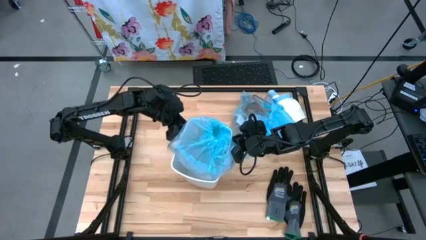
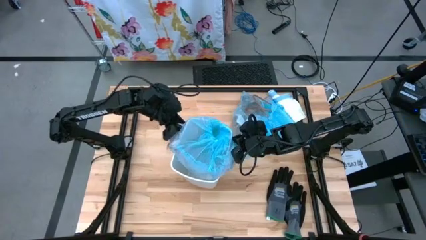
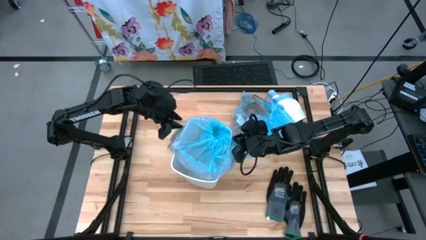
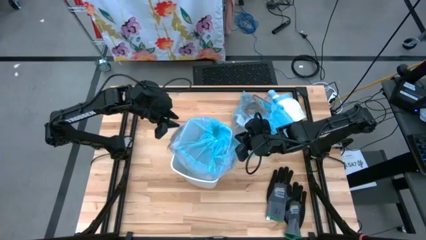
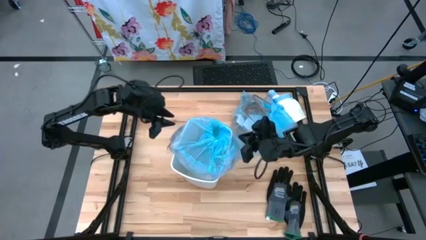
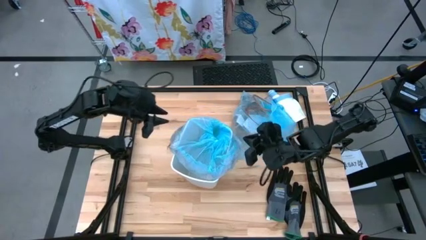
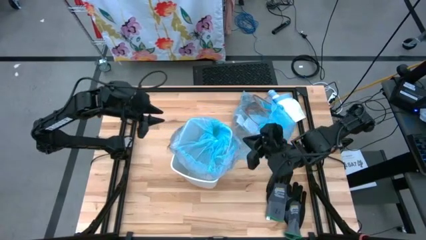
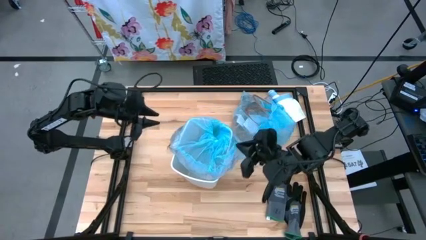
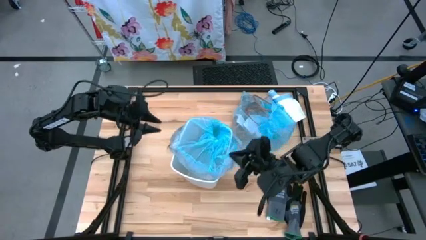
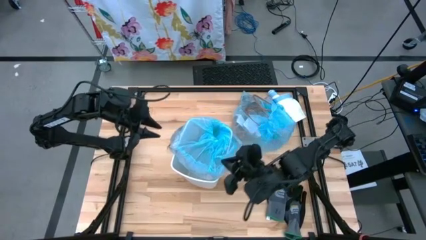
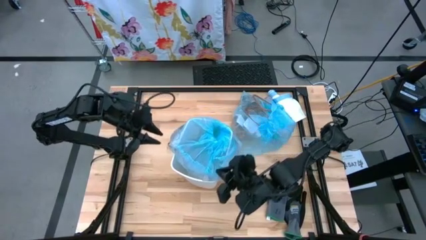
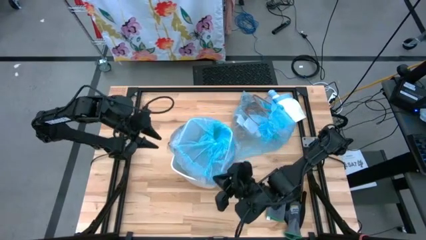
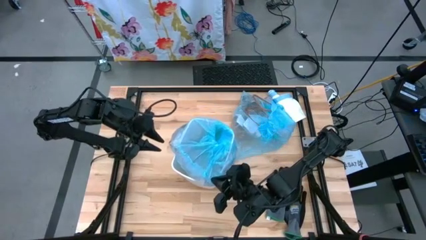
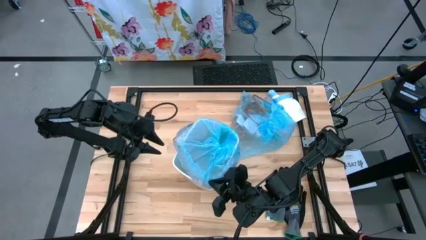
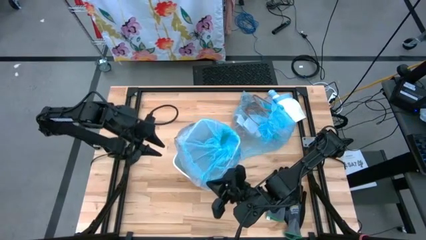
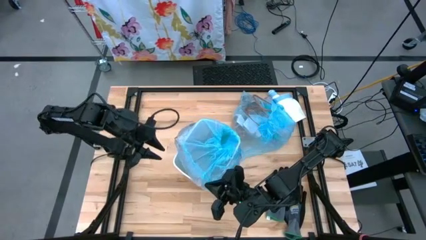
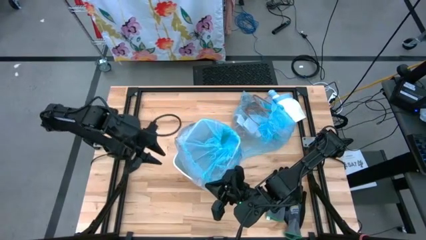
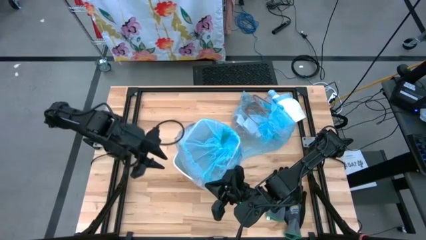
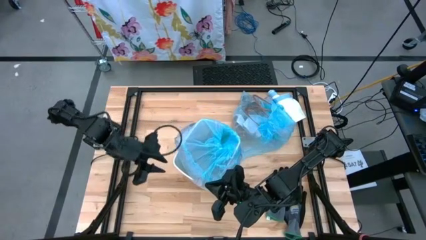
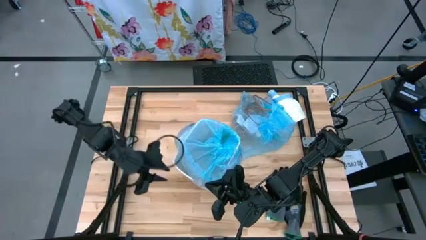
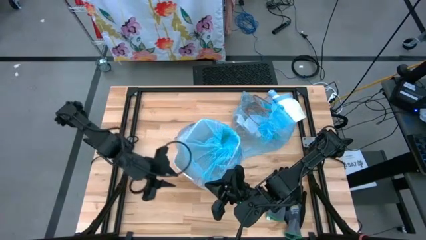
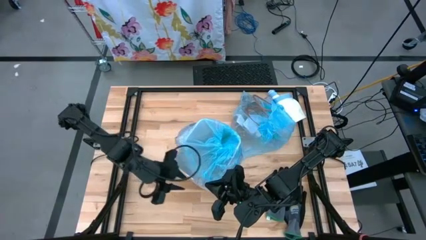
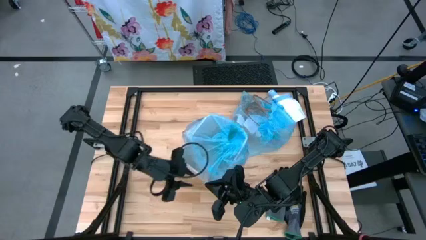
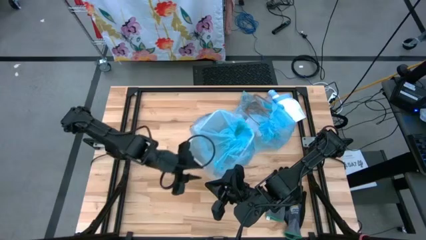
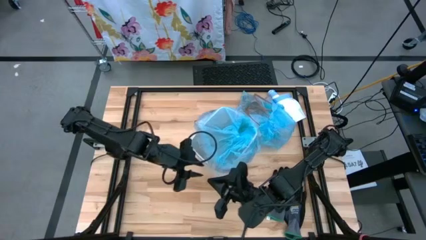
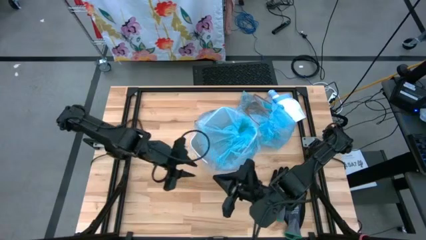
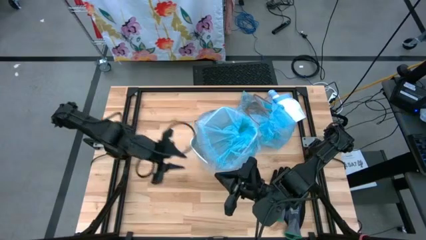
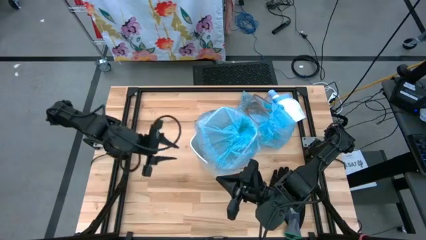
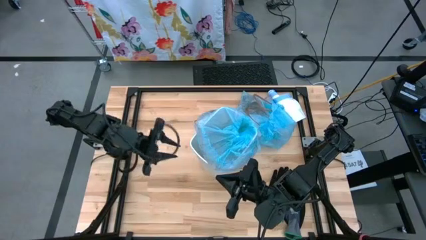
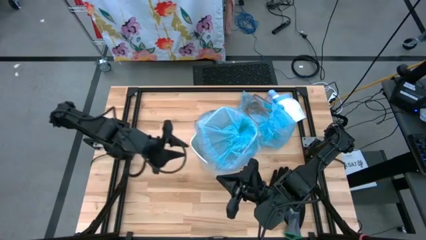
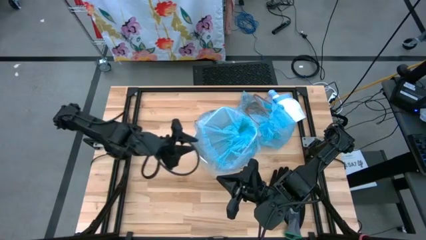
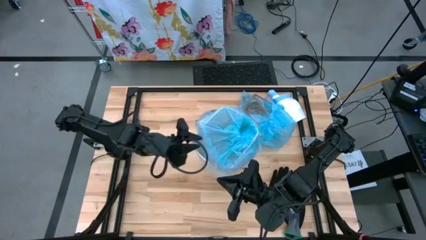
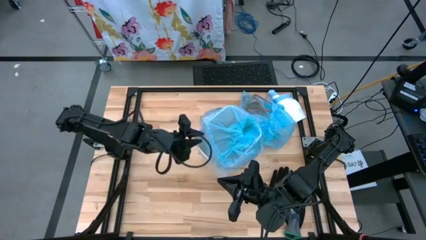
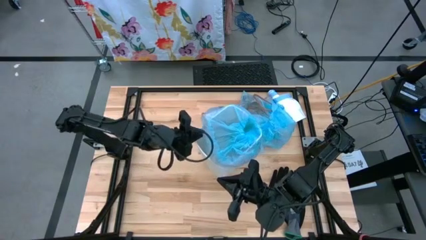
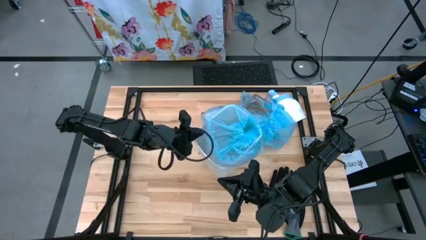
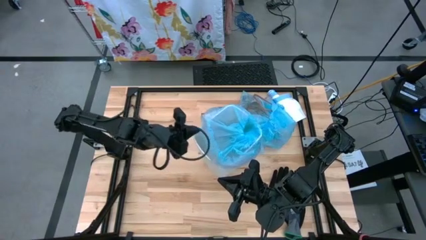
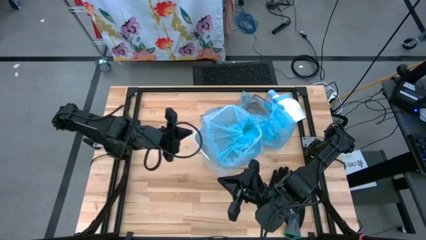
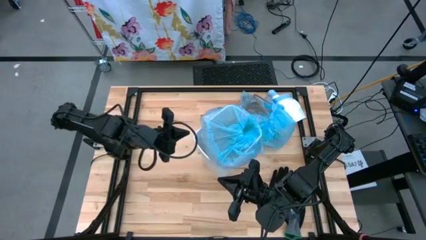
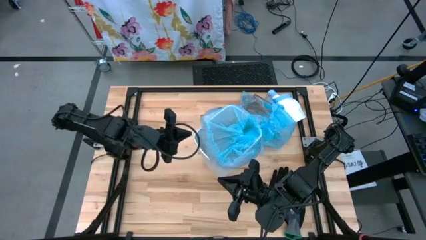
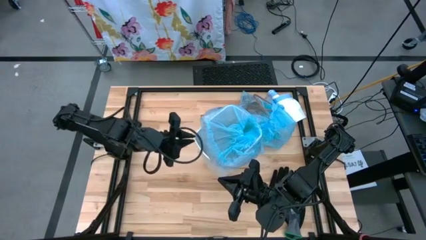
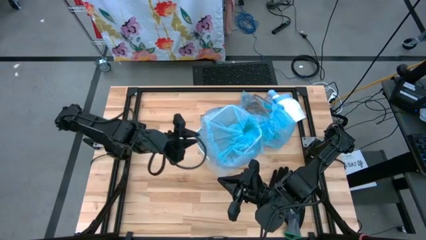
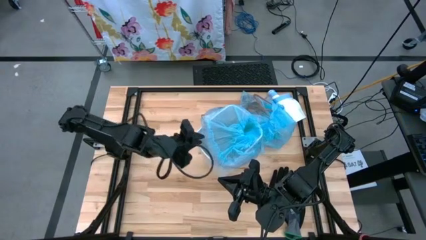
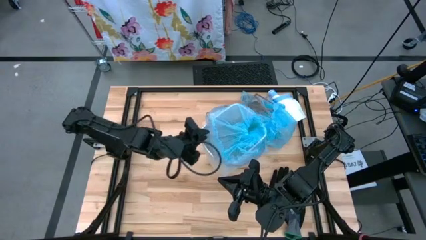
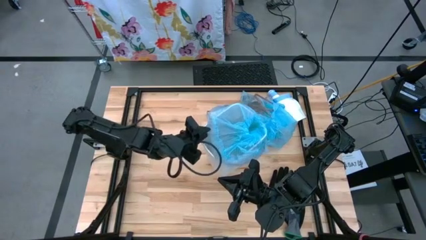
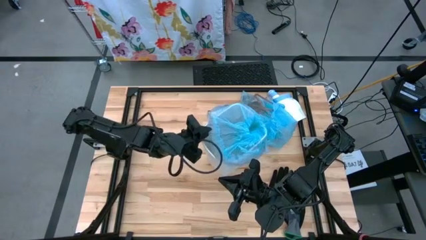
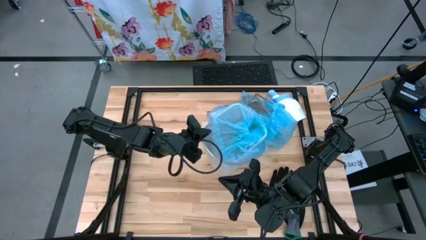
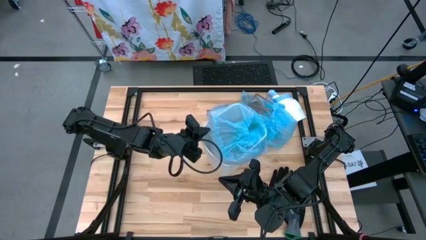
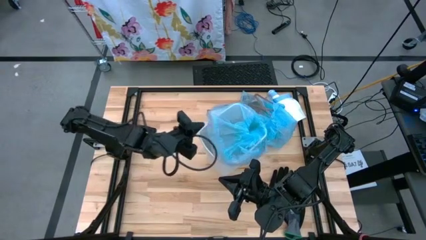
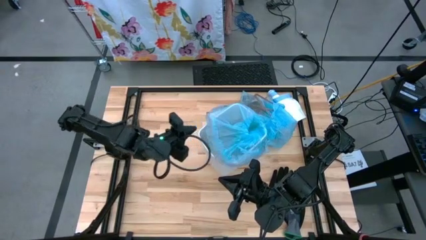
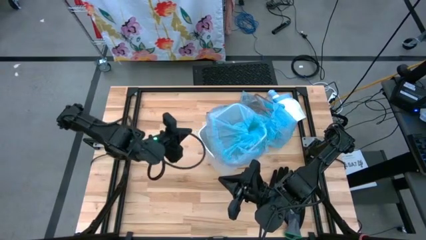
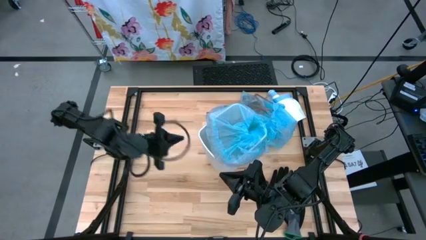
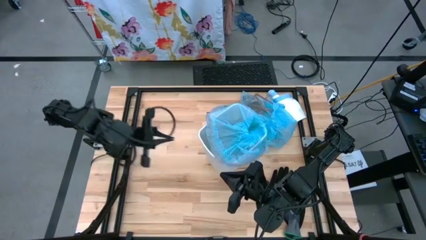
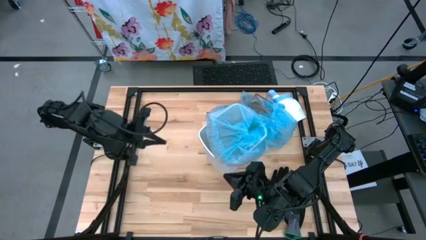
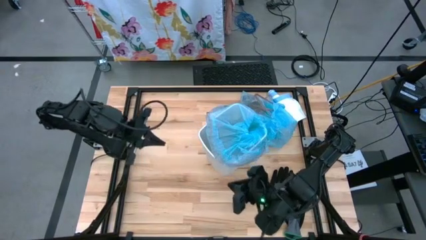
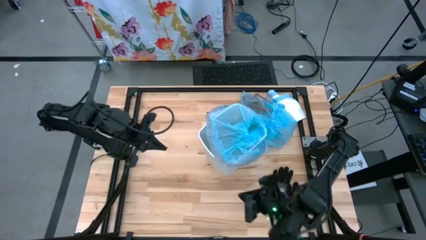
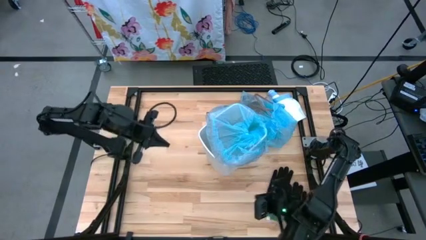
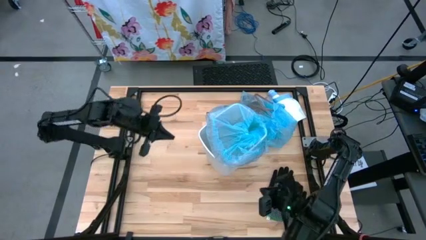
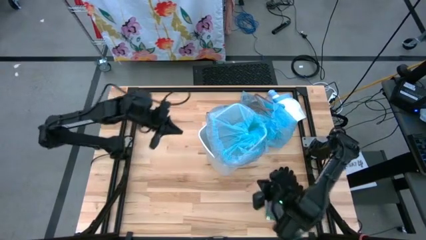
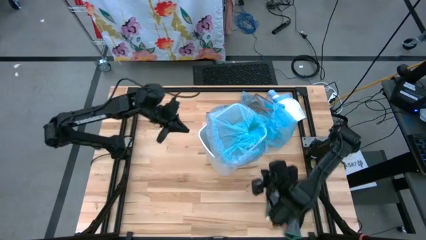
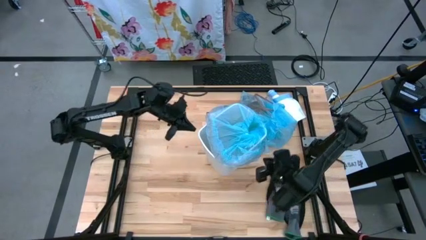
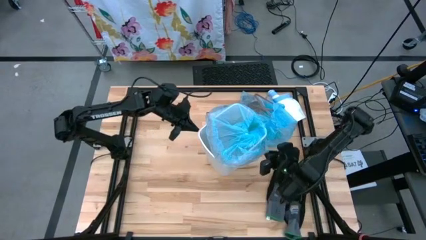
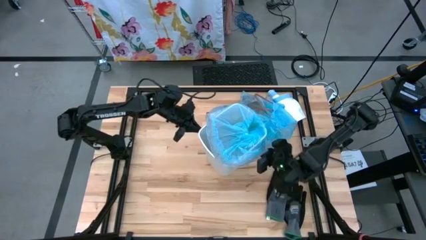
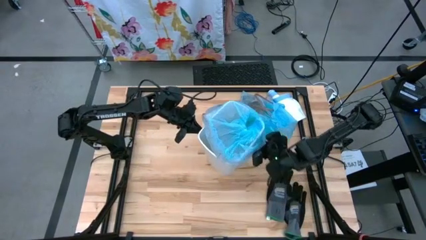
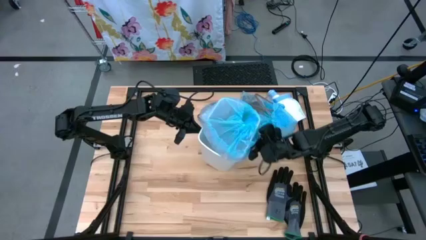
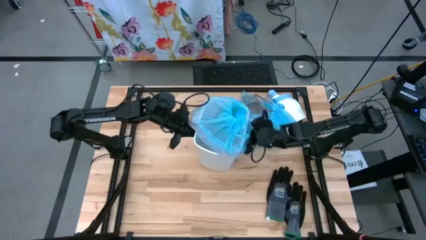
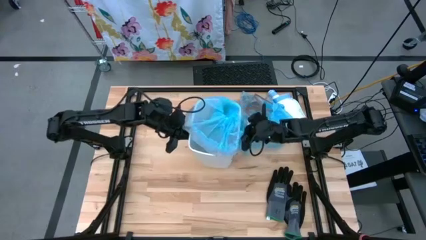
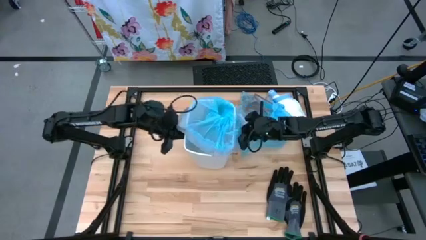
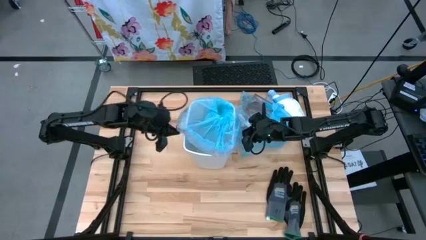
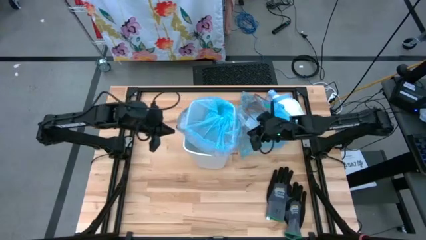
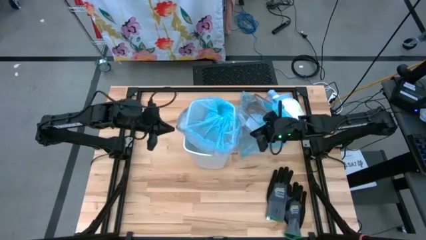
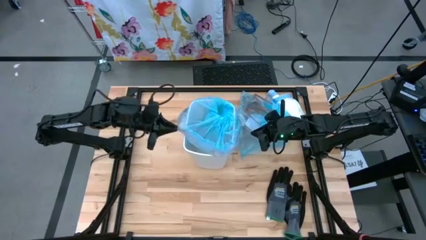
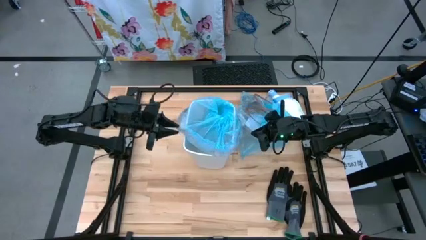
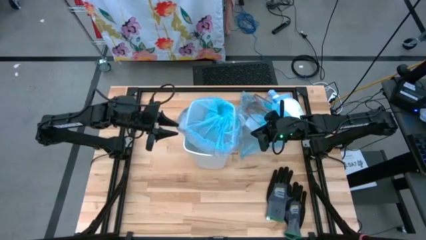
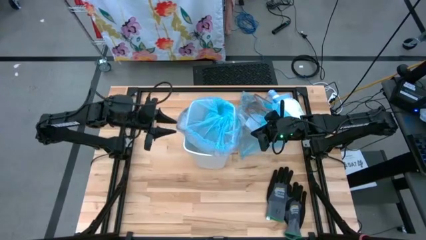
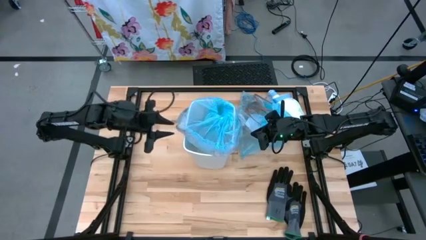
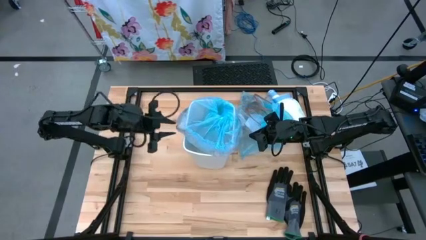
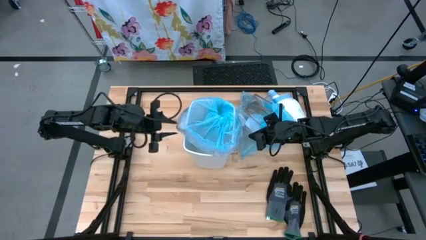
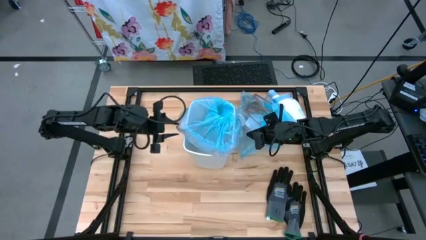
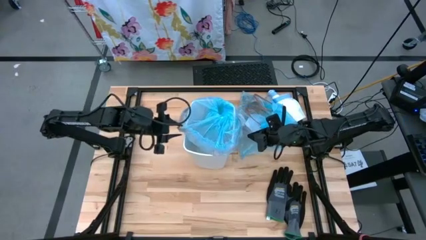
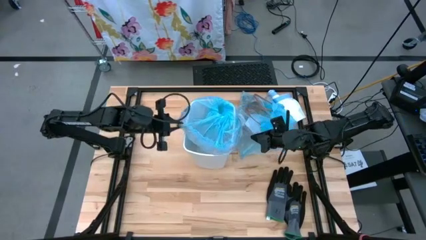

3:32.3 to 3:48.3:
Task: place trash/remove bag and relplace
Insert the new blue trash bag into the white trash bin
